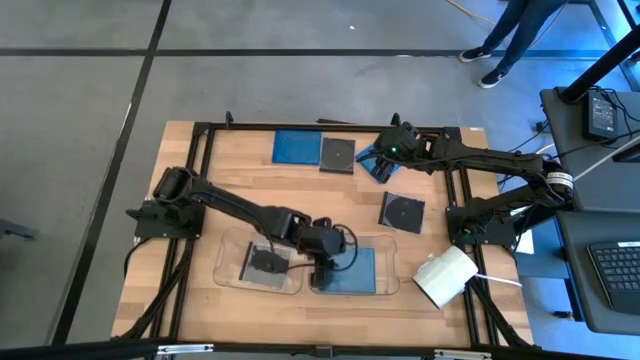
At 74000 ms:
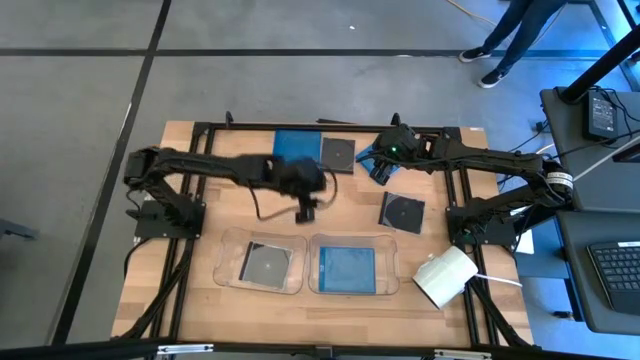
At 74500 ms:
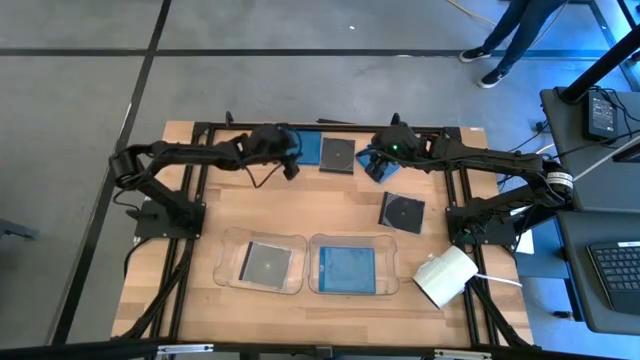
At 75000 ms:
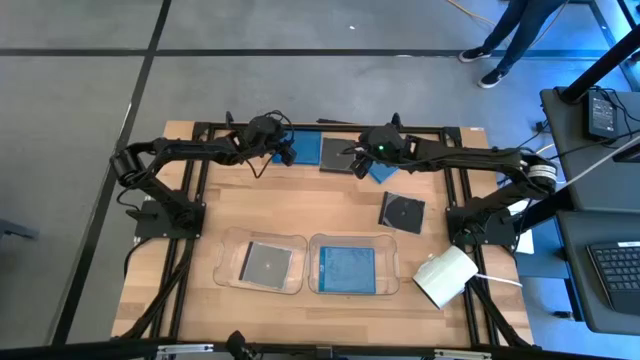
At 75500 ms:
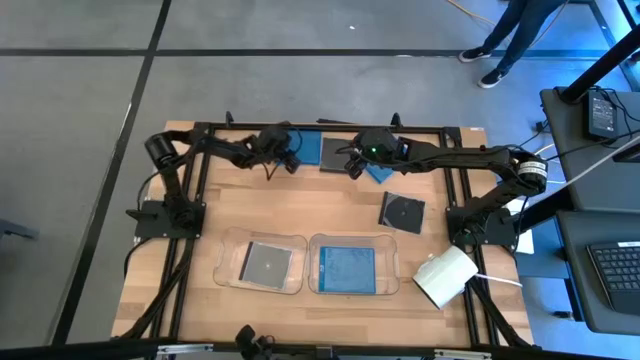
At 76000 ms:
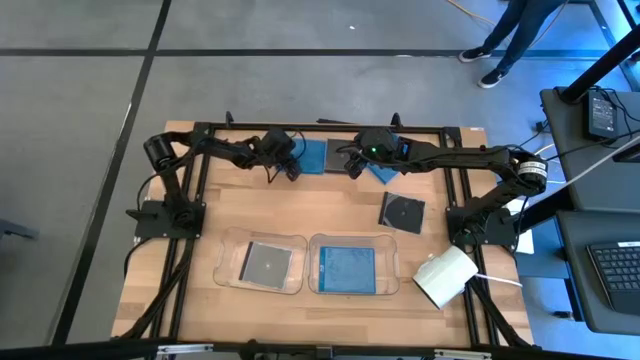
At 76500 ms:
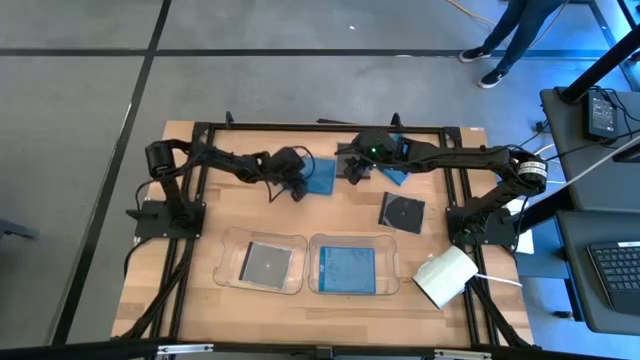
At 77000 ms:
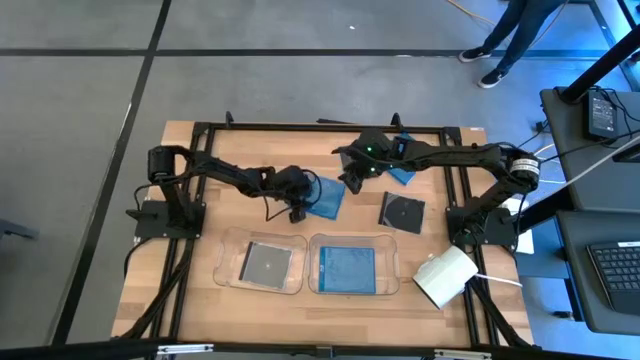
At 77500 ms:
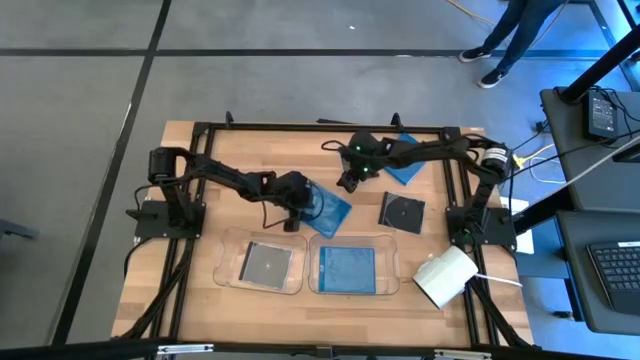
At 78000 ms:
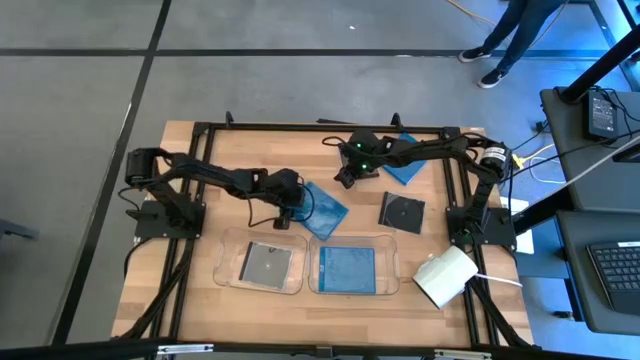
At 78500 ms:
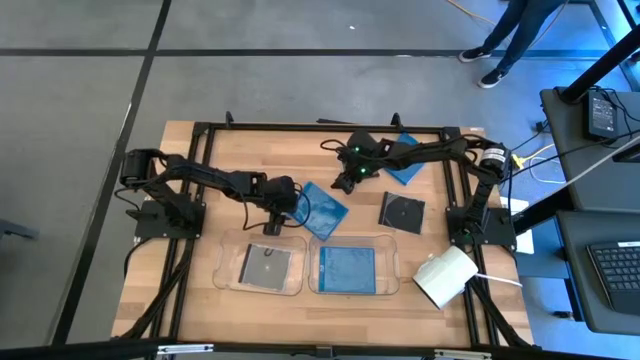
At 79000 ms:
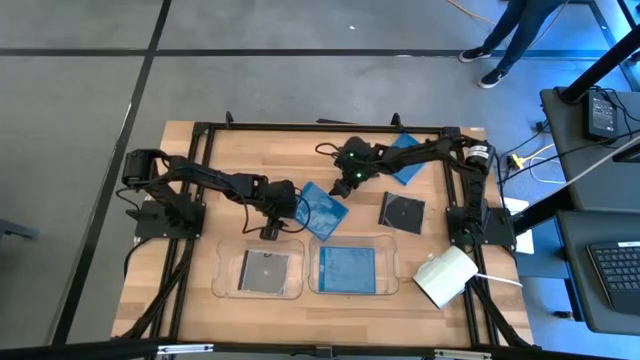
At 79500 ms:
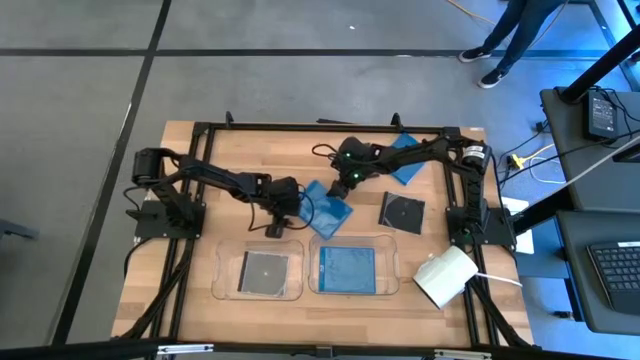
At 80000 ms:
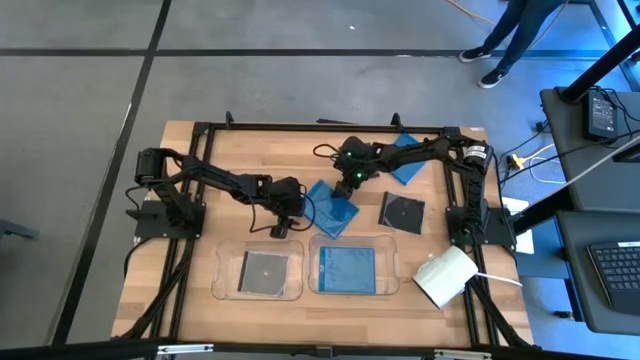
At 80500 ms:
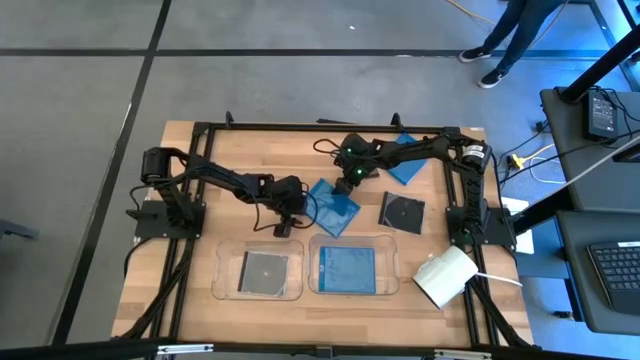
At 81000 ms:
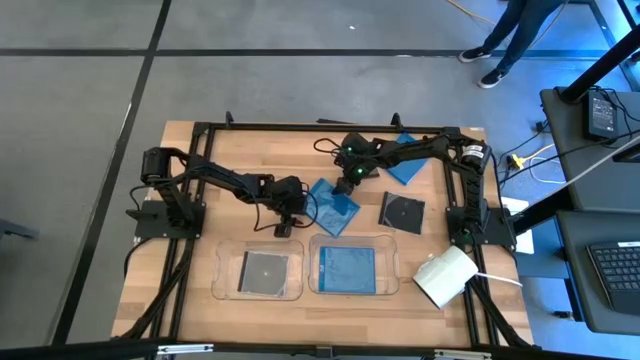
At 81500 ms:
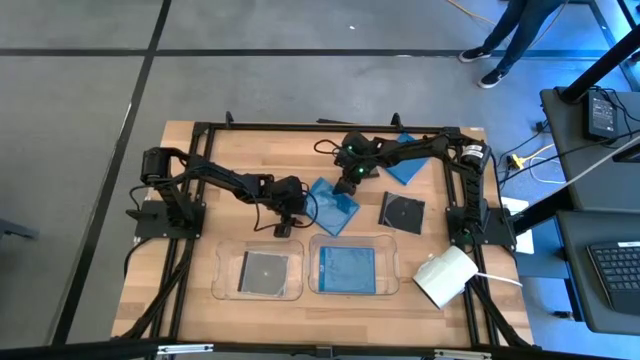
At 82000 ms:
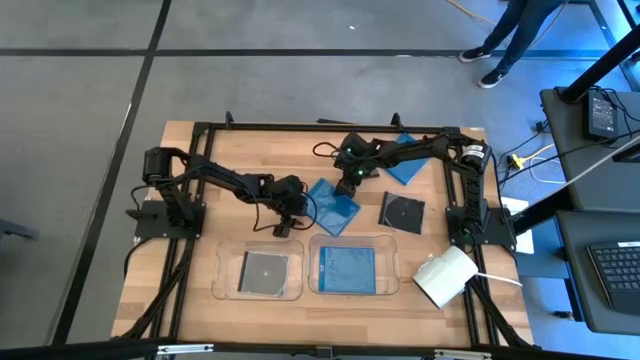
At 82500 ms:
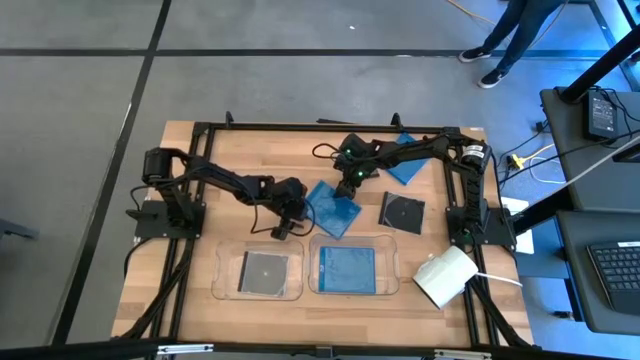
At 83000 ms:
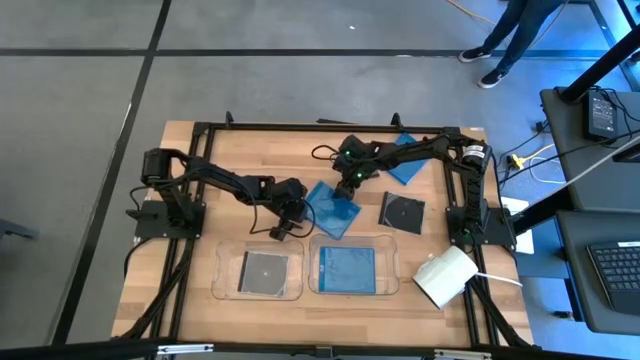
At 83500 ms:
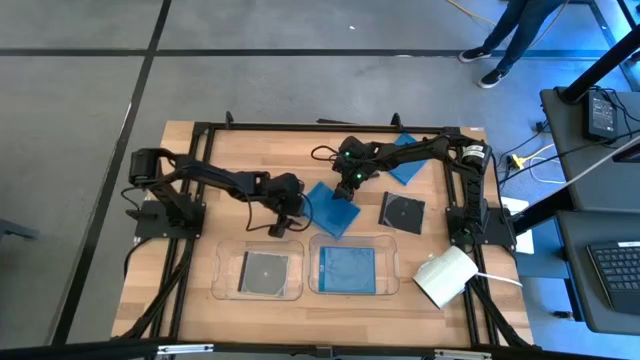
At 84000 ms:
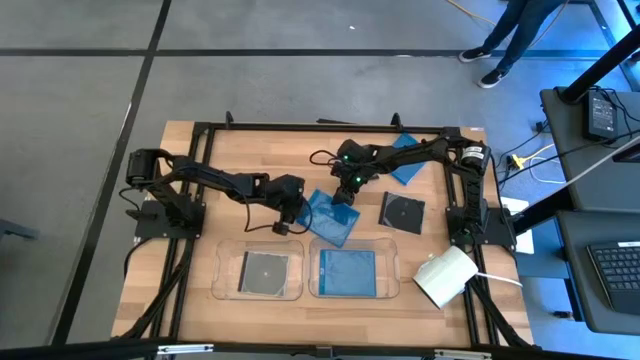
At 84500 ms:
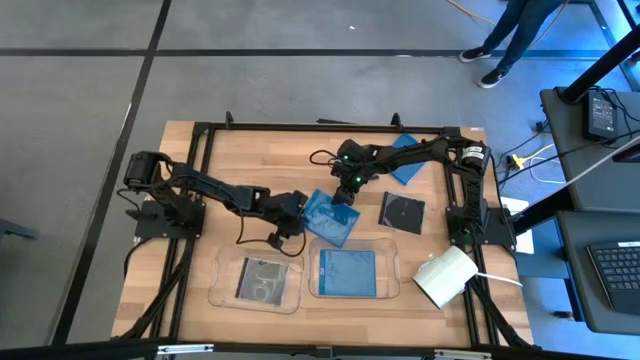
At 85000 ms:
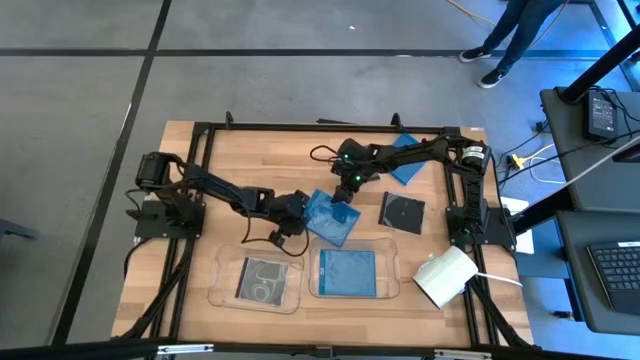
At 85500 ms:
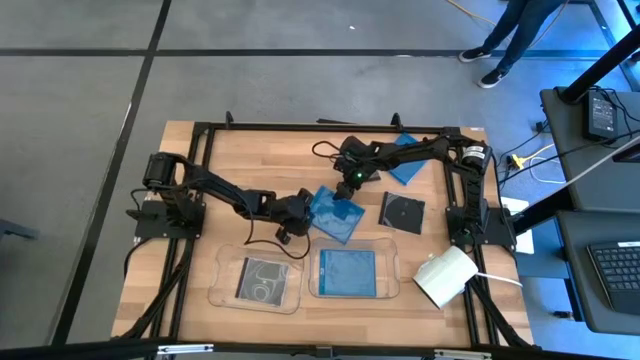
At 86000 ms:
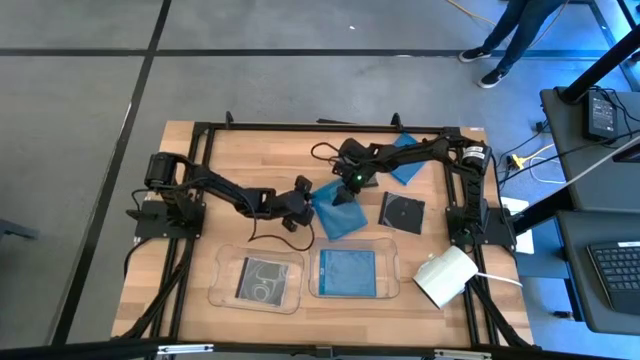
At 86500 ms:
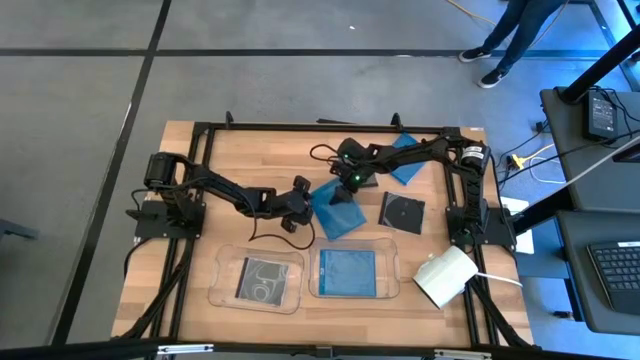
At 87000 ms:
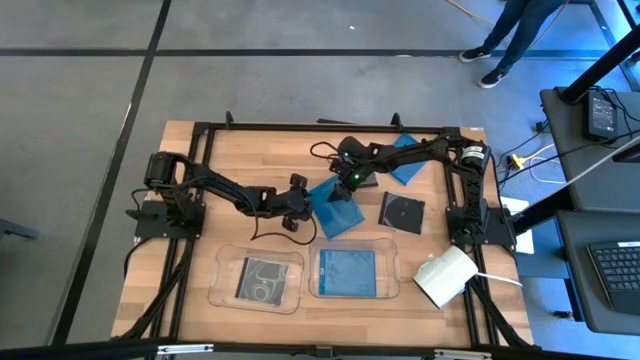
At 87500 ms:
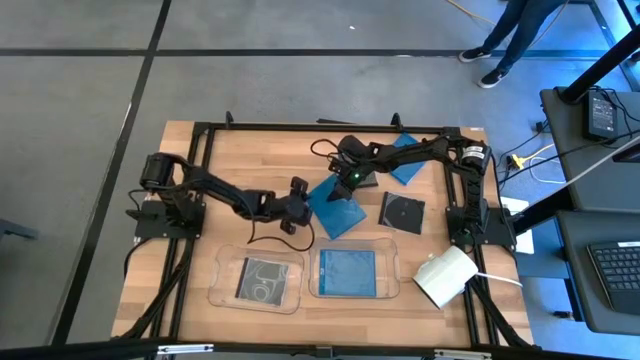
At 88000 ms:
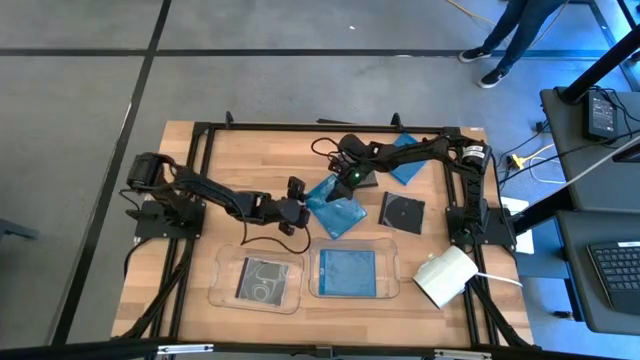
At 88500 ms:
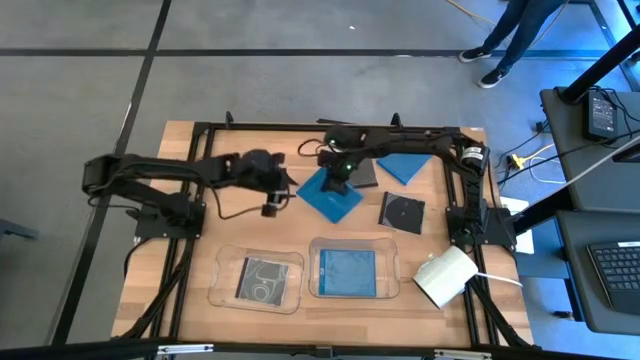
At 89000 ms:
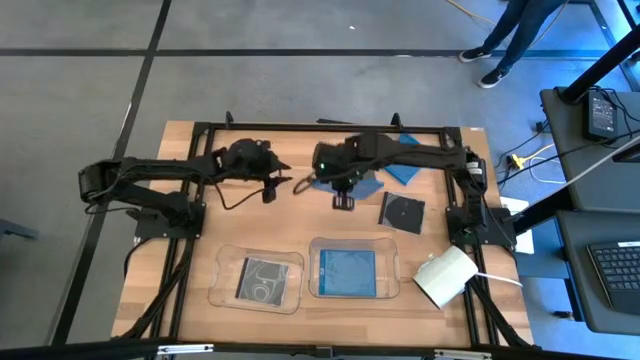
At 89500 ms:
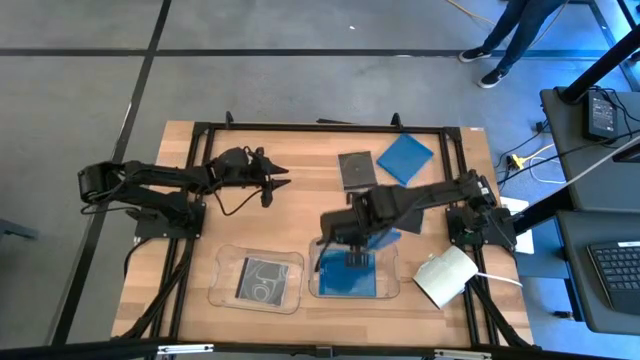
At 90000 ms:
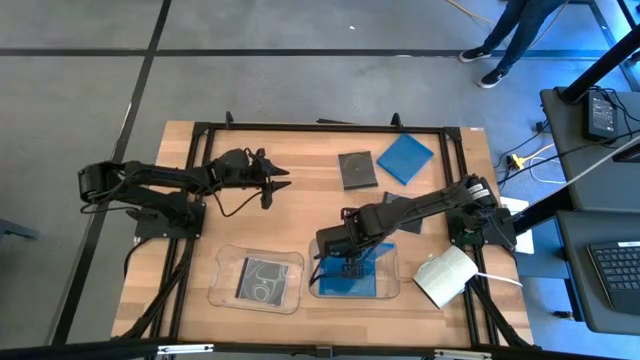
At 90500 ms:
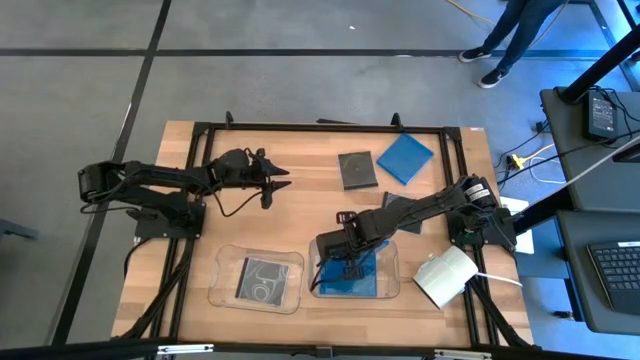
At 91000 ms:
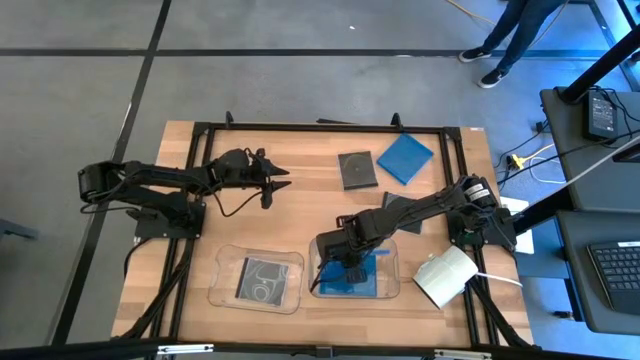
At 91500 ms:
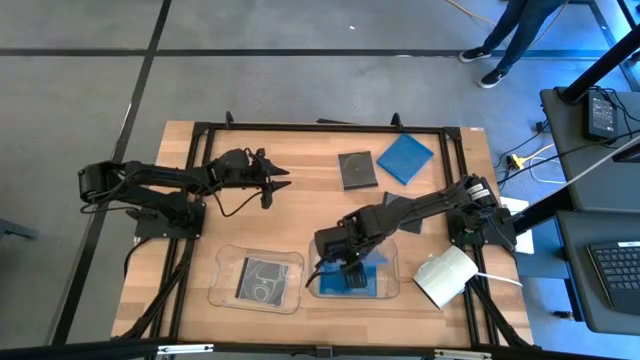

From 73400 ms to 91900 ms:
Task: Pick & place jewel cases by type
Put the left blue CD case into the right transparent bin
